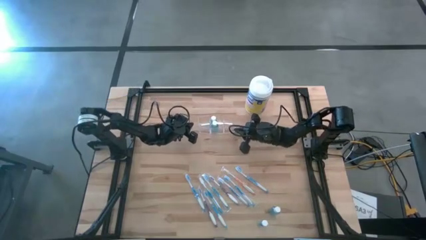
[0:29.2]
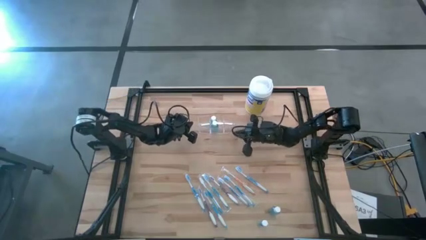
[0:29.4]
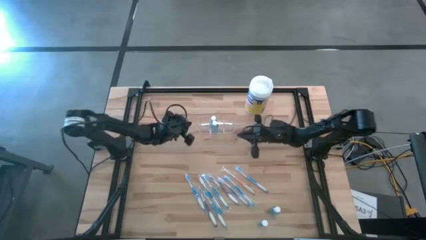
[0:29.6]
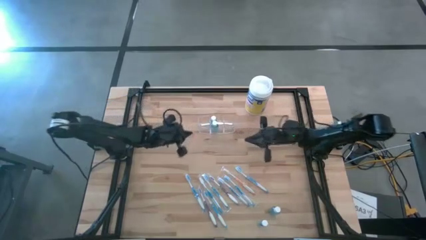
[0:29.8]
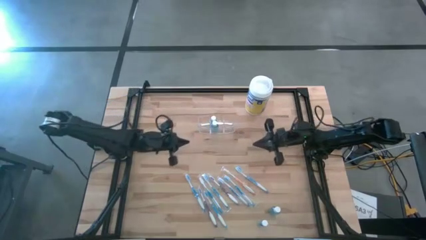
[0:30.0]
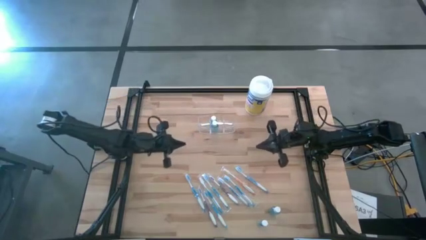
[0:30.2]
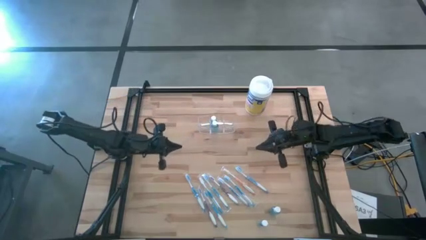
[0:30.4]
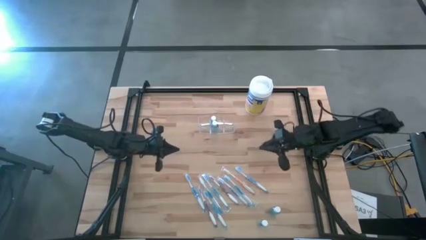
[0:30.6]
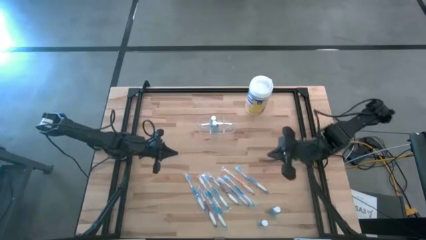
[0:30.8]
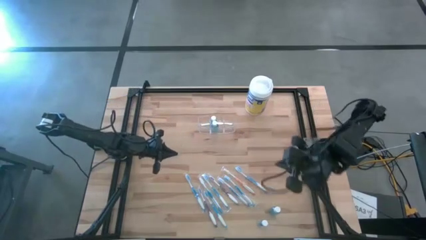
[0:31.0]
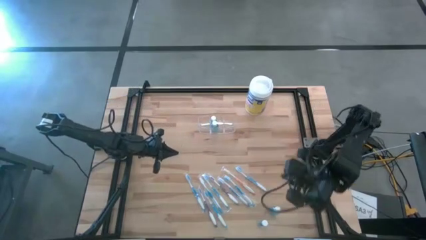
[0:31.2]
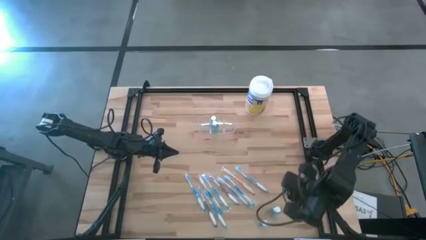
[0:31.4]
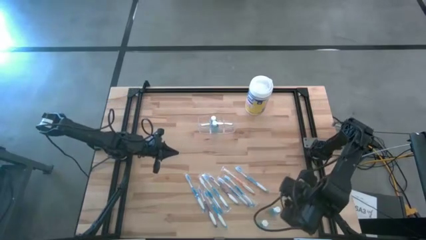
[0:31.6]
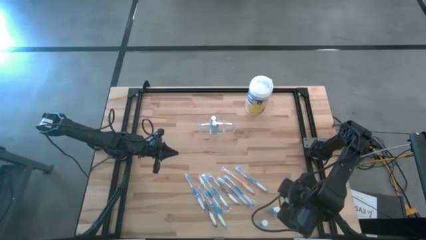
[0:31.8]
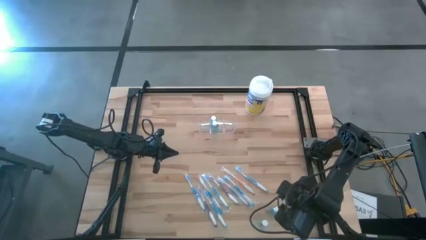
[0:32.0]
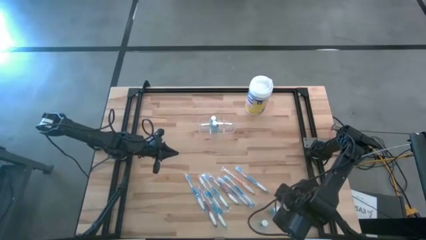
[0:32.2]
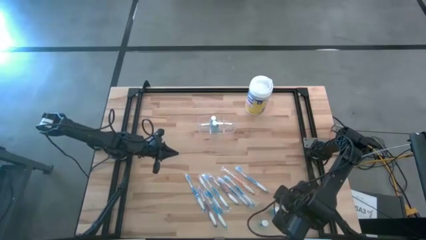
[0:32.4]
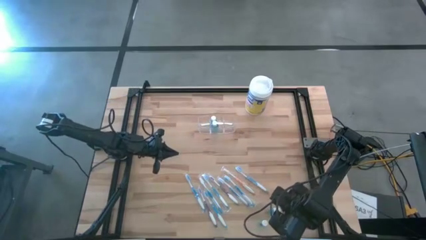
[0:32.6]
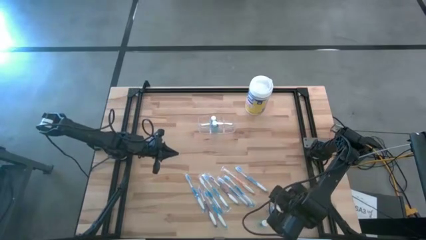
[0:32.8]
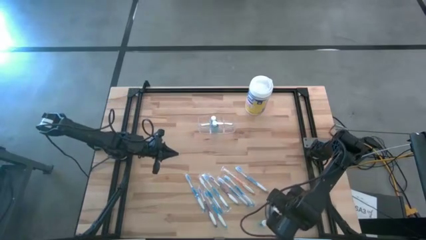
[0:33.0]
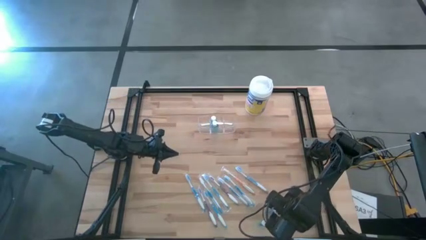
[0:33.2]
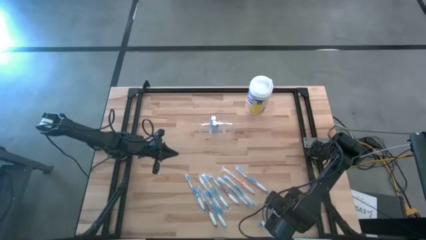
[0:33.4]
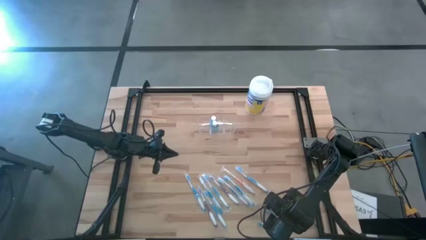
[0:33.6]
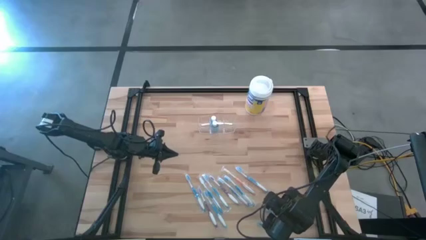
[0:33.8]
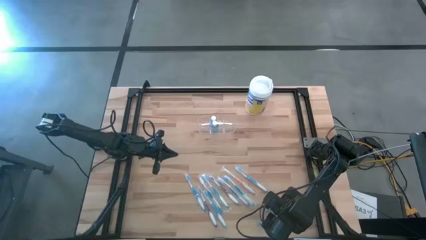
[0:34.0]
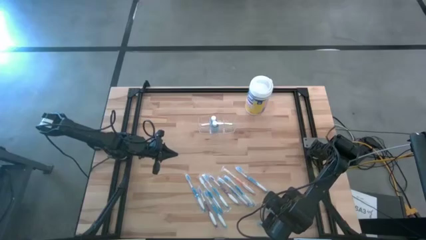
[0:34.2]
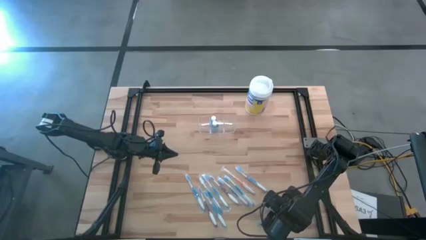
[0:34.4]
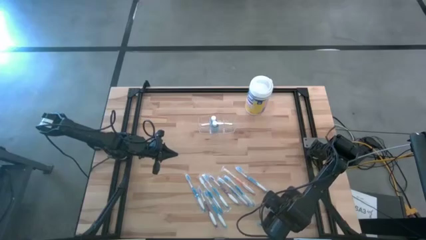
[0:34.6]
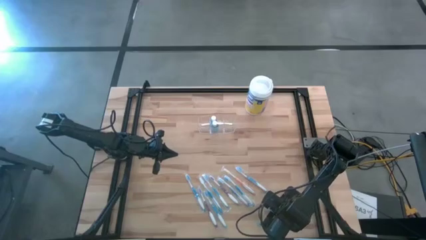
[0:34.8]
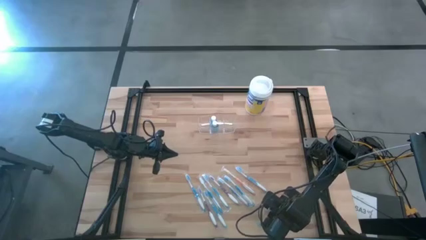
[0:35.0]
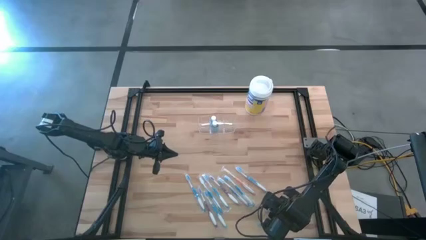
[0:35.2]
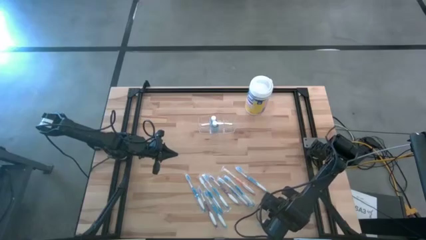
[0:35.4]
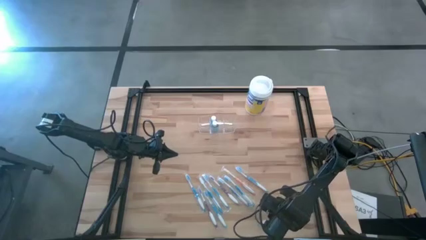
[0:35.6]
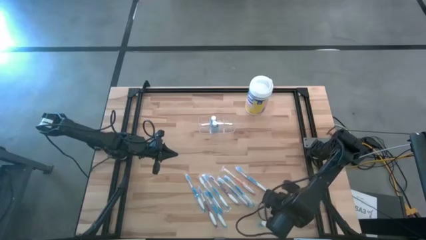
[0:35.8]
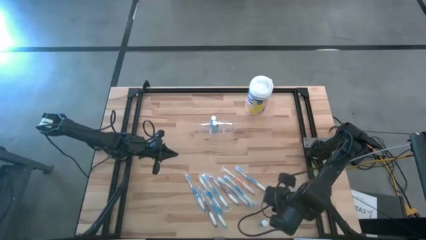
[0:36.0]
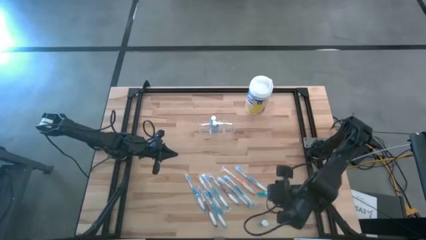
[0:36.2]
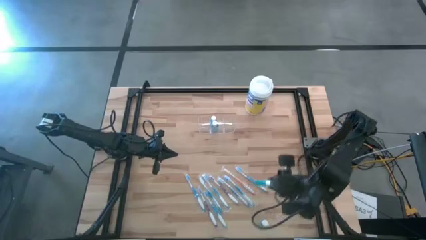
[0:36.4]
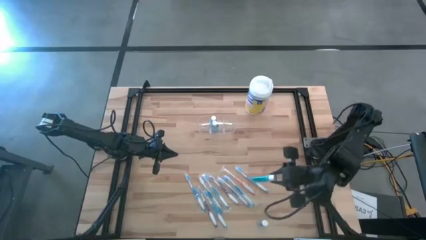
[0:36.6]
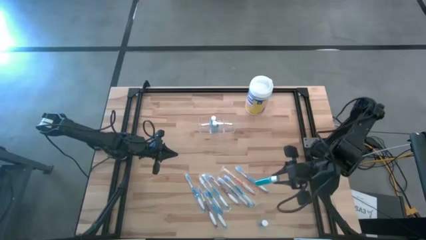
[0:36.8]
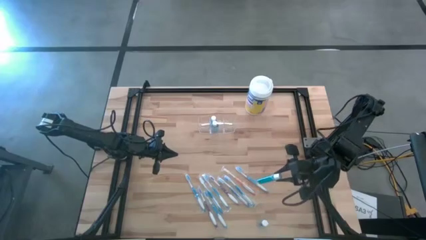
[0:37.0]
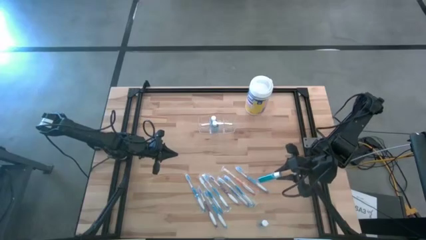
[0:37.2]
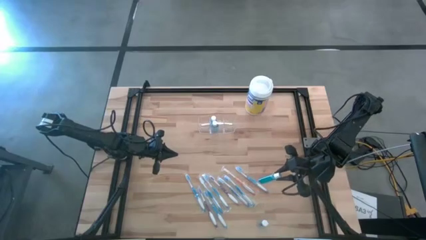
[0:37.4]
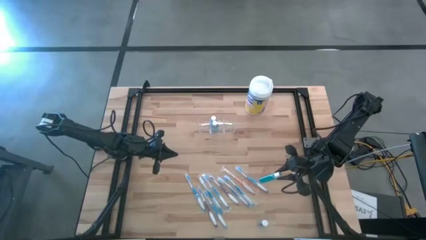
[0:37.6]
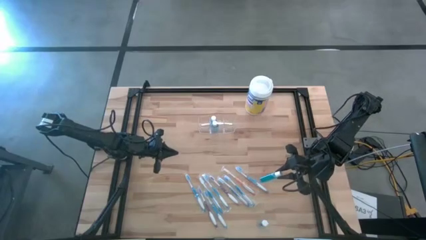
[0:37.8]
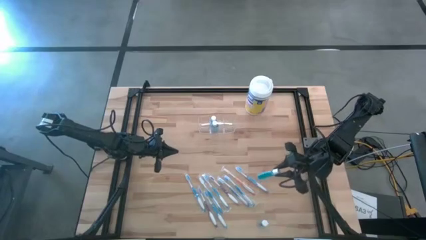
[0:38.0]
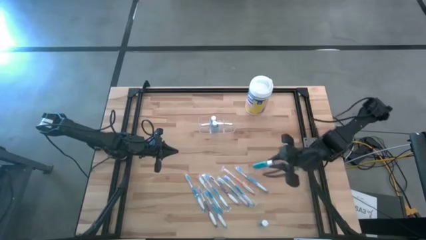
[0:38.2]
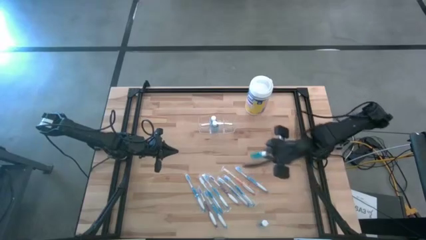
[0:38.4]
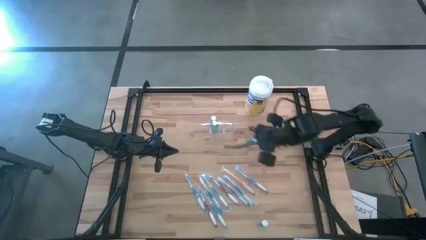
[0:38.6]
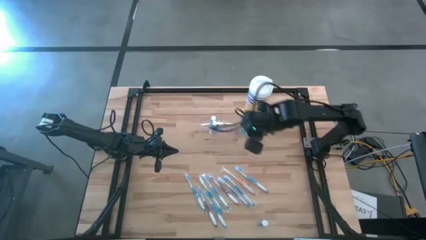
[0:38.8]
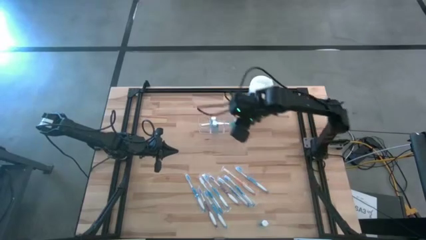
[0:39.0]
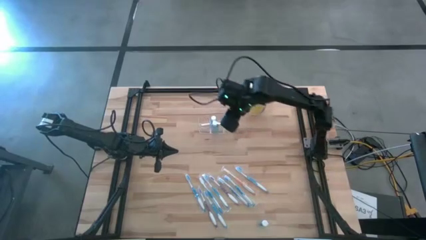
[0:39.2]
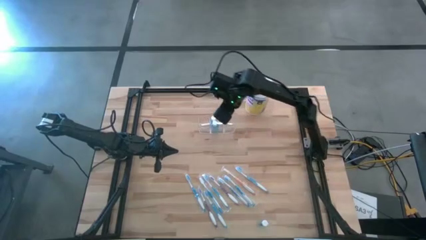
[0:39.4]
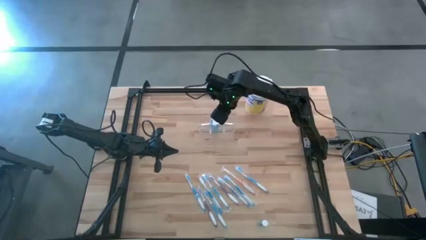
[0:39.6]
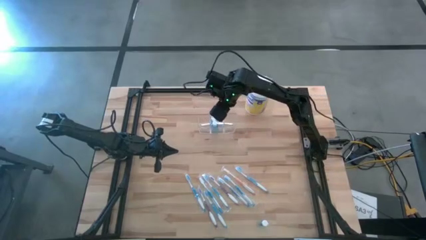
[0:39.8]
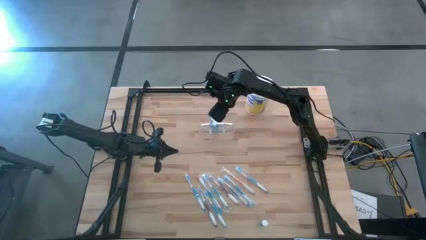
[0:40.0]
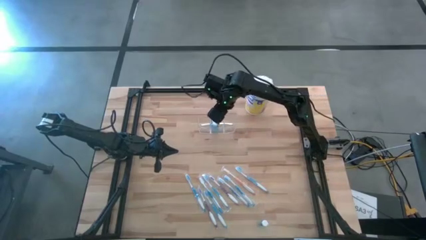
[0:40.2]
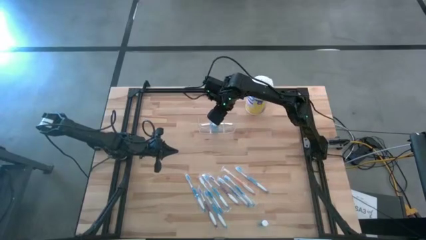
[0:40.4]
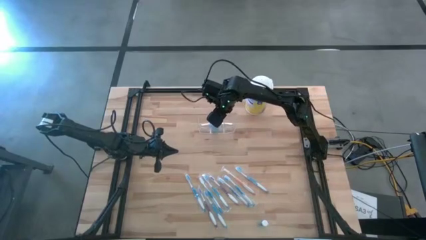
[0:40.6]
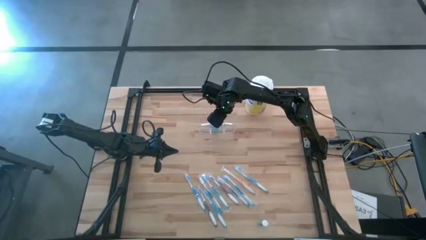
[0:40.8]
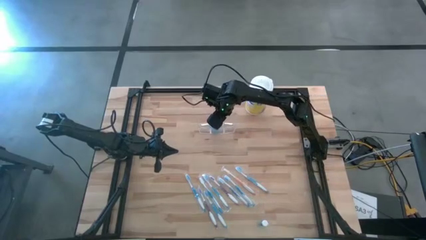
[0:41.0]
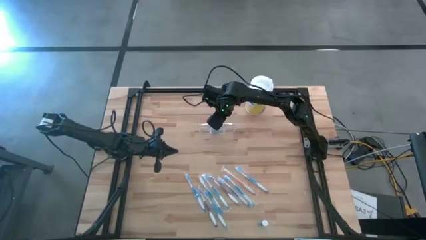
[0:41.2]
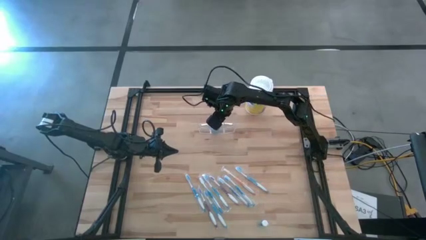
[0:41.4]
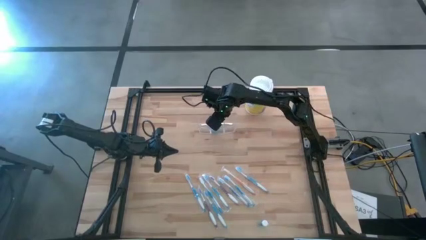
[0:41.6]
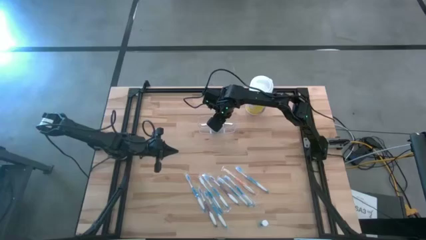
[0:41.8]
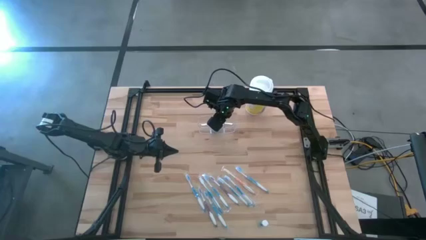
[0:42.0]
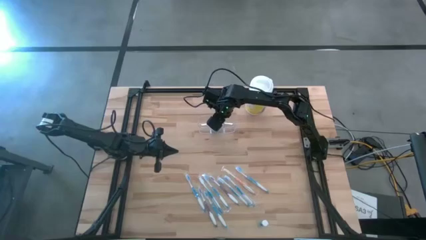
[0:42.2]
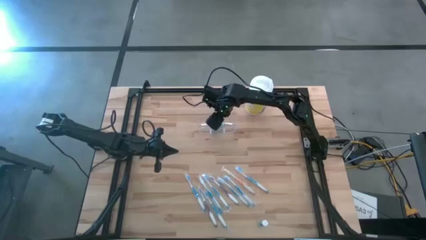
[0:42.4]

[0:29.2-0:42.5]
Task: Pick & Place toothbrushing station
Put the top blue mouthwash into the transparent organizer
